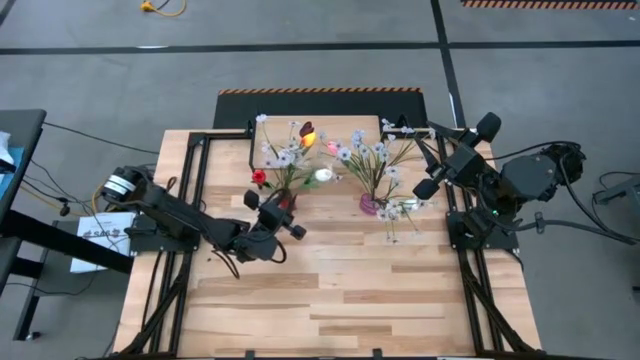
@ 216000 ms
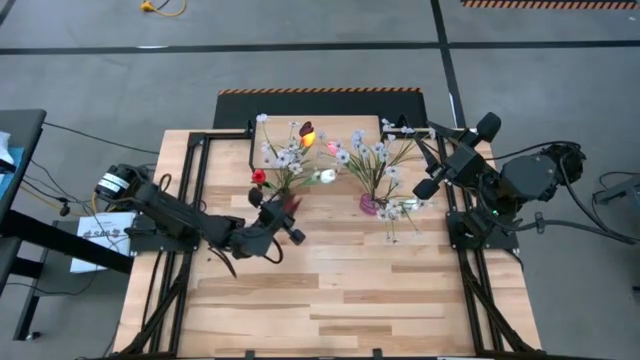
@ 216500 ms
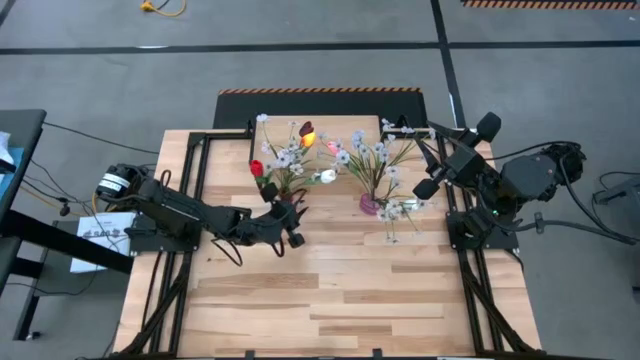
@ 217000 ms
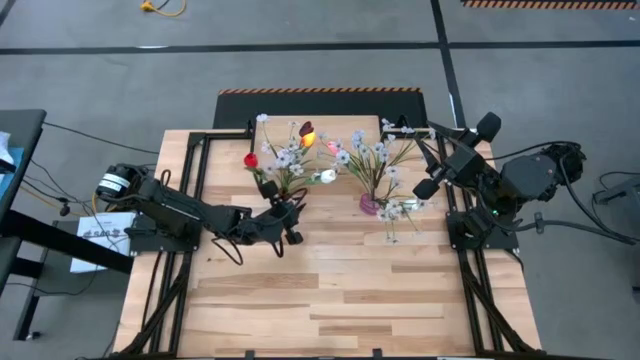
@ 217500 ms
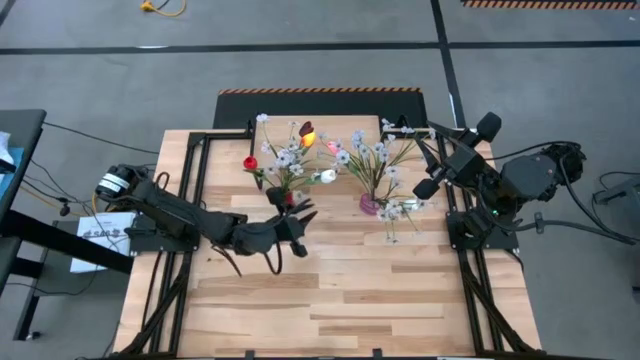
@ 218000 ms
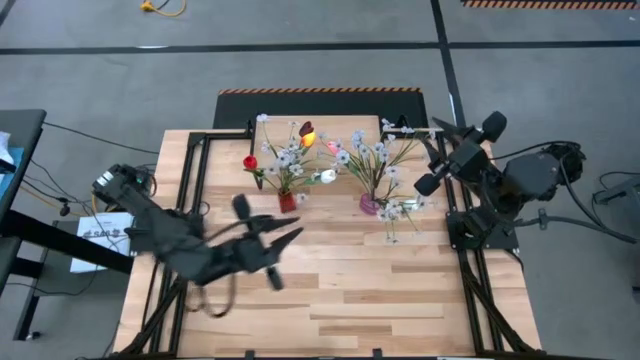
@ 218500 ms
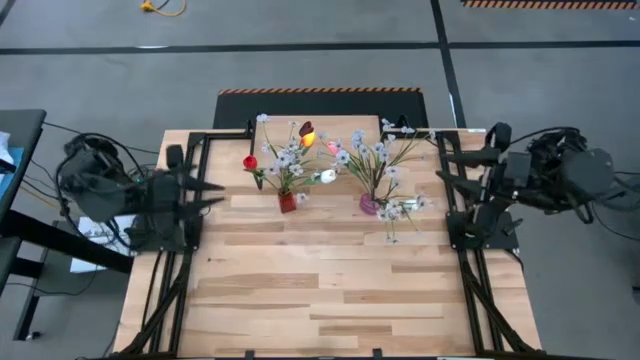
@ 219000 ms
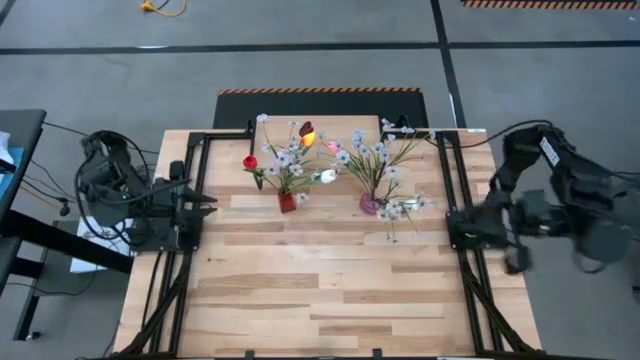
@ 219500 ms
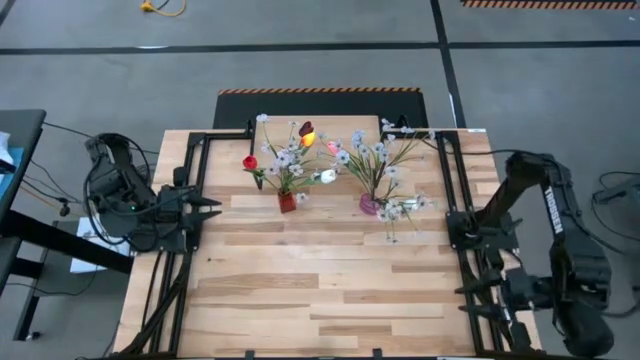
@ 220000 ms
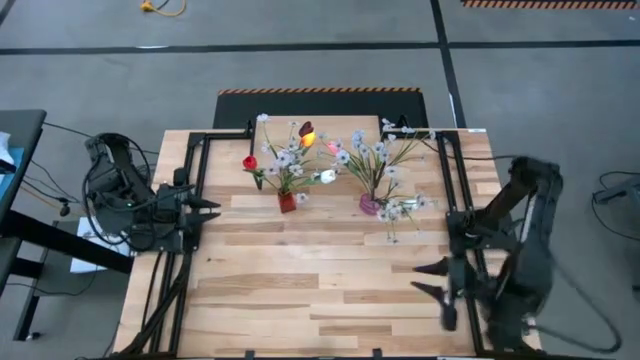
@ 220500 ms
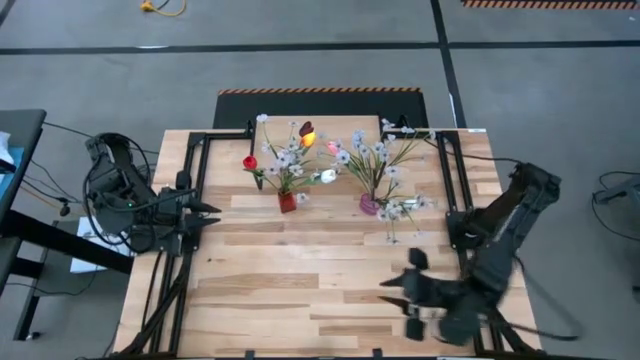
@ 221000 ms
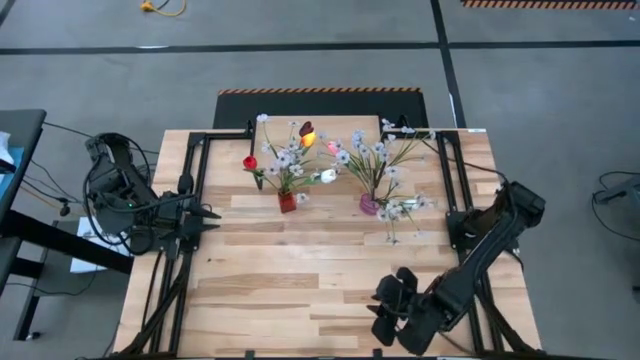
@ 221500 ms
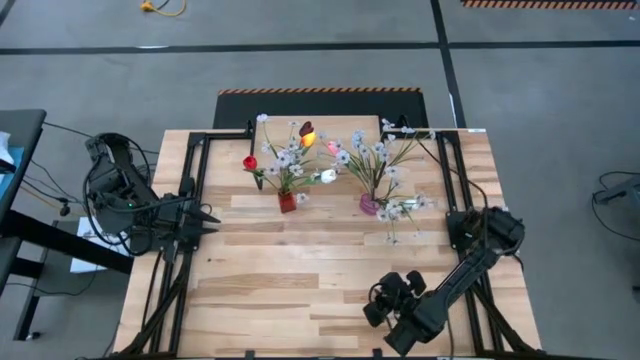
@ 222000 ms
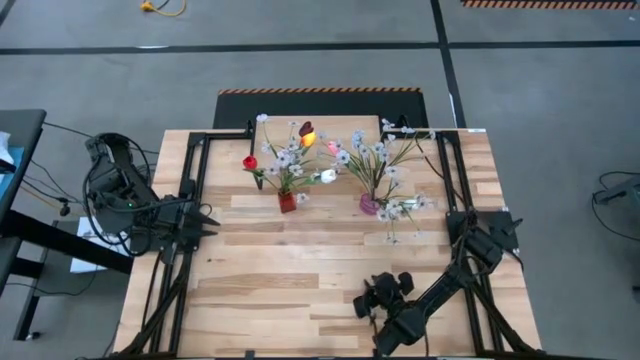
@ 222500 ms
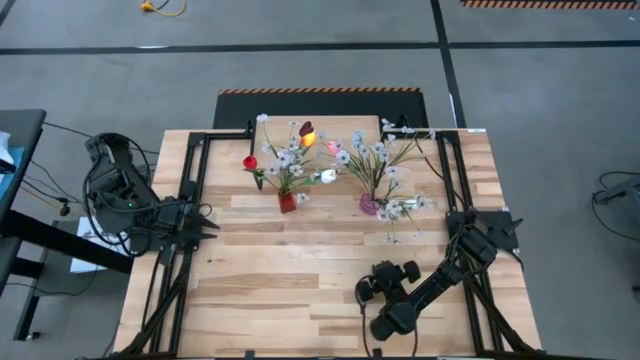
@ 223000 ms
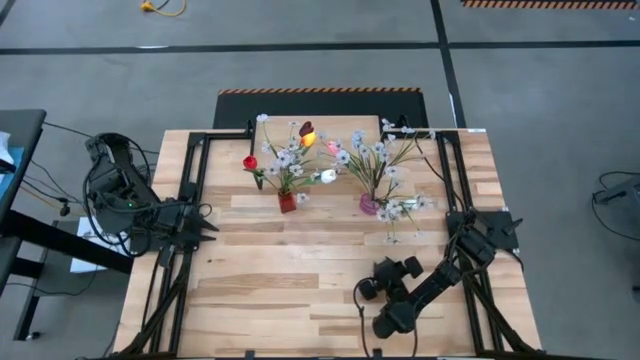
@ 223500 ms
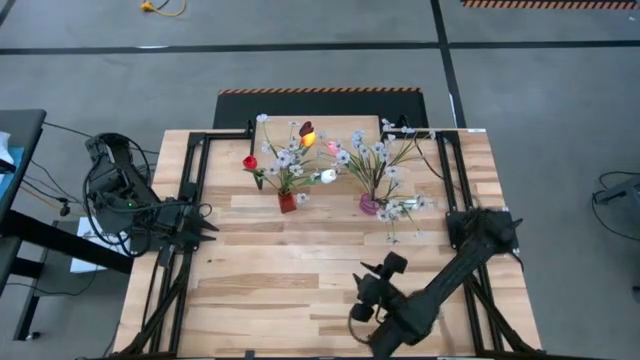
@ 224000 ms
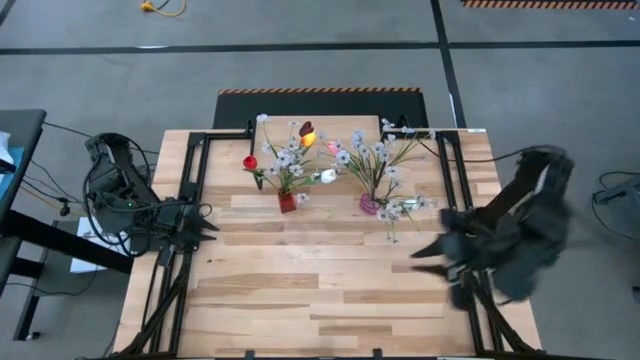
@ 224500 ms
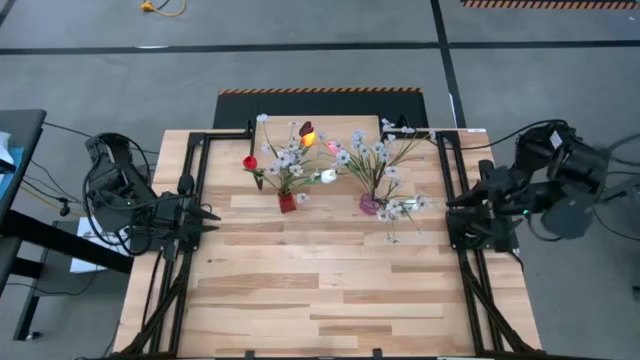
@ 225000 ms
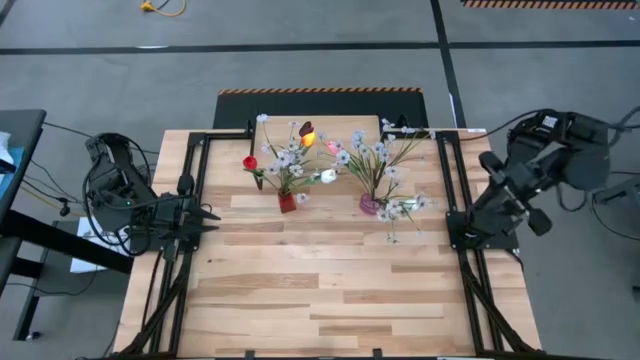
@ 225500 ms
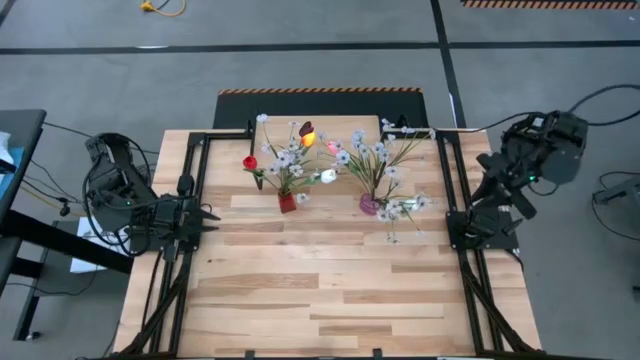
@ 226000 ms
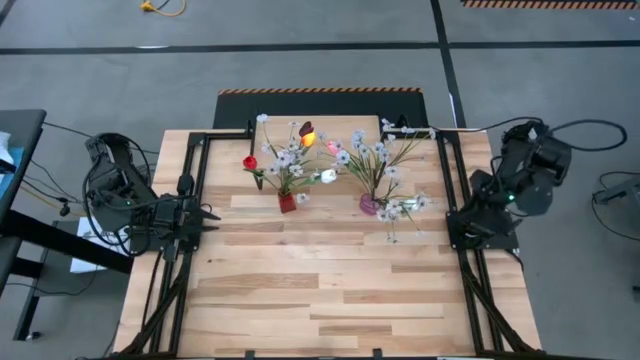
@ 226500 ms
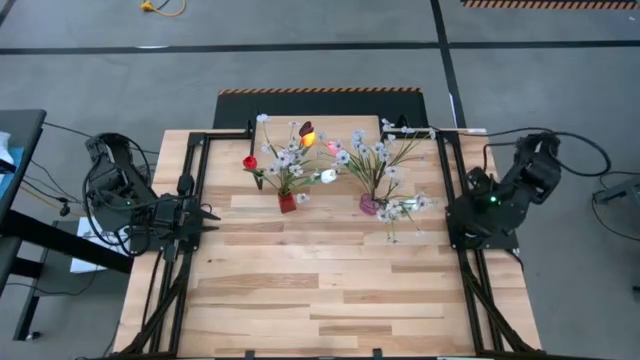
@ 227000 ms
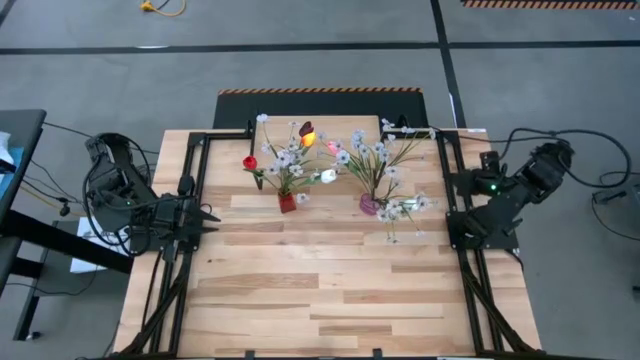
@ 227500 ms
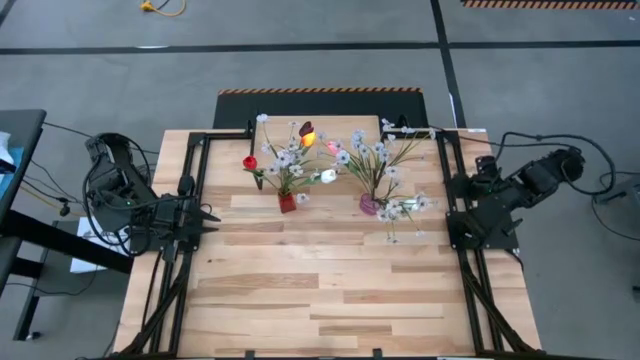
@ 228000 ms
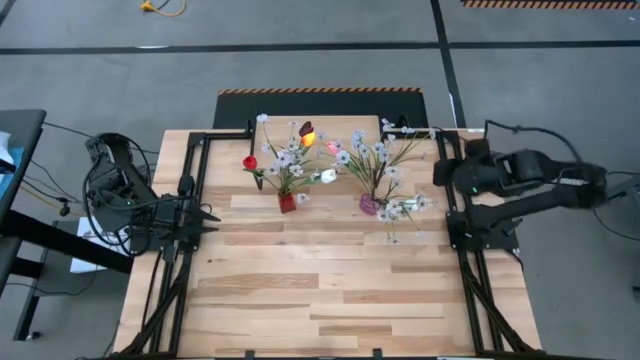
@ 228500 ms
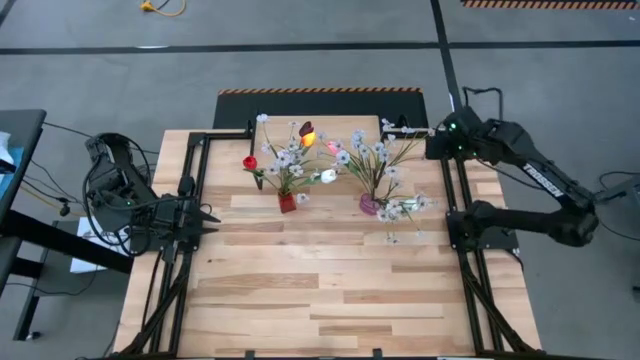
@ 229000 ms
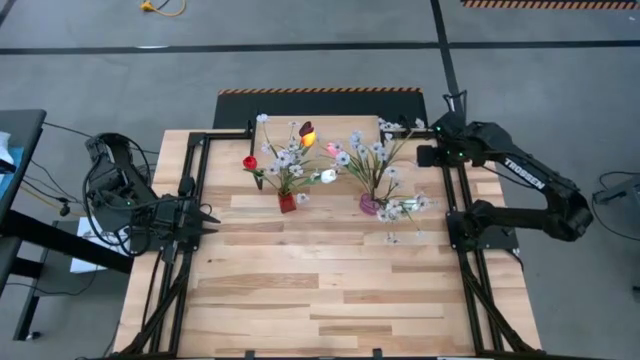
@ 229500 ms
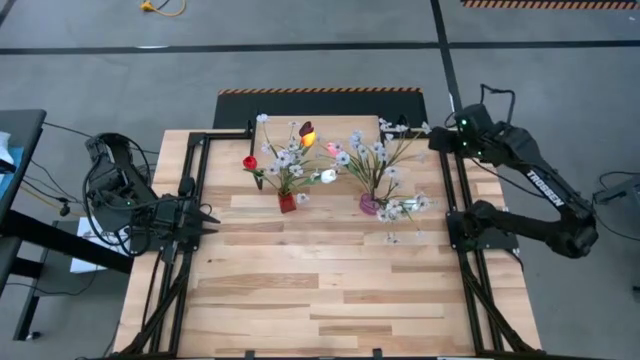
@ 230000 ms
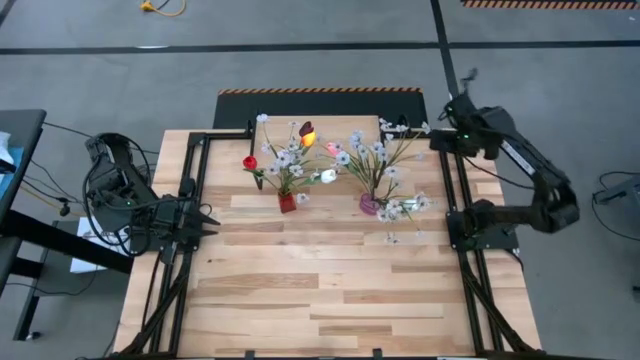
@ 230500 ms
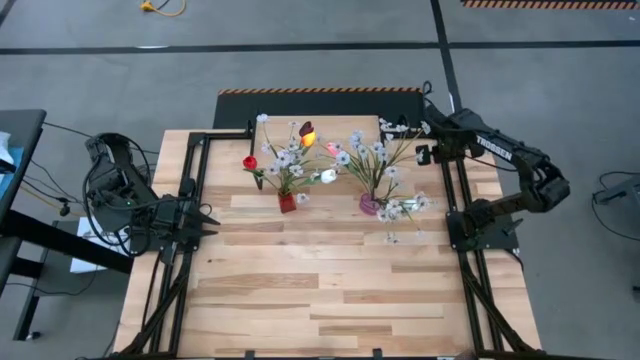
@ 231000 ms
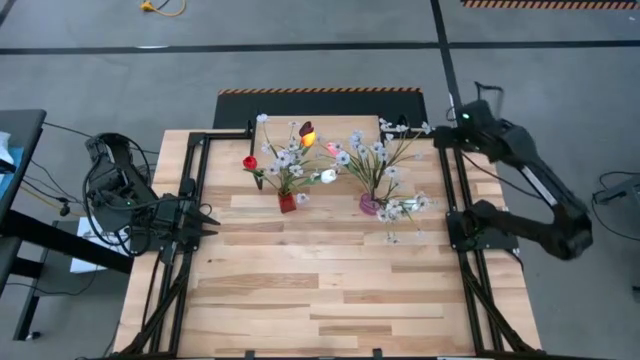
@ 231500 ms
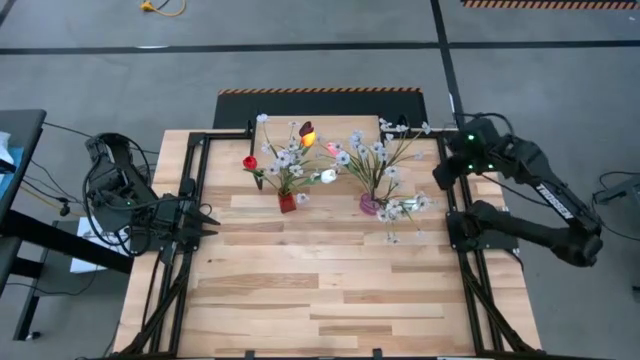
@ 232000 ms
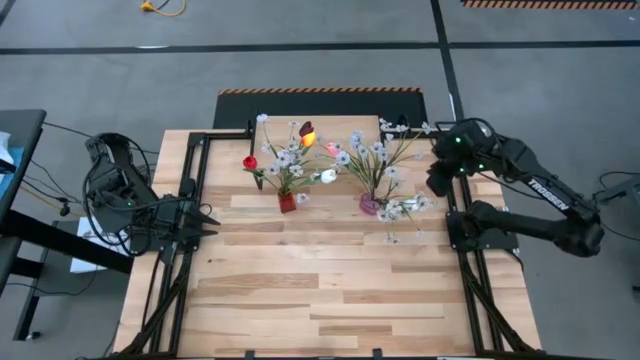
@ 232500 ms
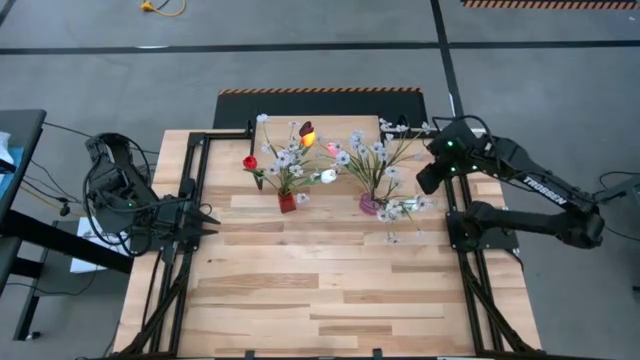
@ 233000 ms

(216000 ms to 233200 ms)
Task: Pick and place flowers into a vace then onto a shelf
Put the pink vase on the shelf

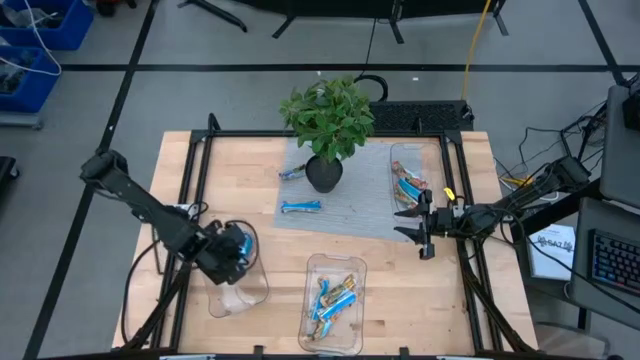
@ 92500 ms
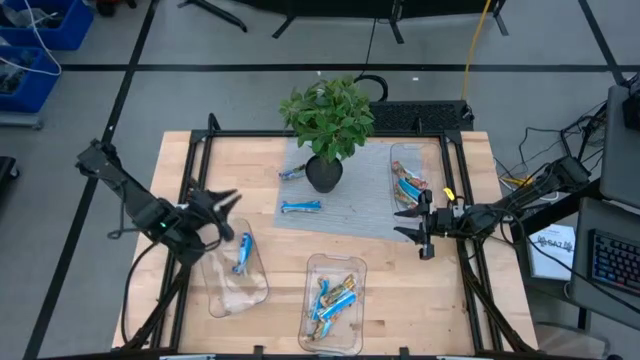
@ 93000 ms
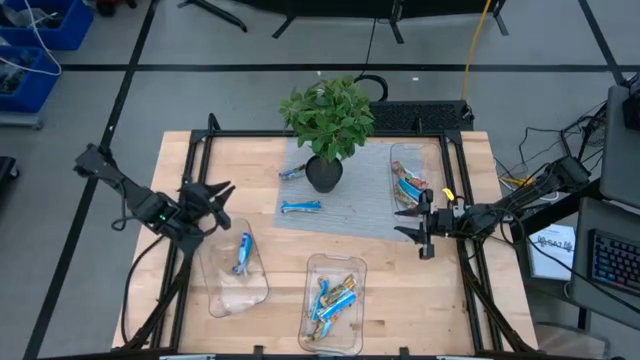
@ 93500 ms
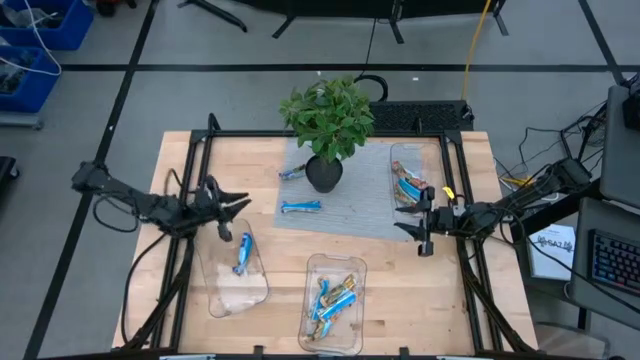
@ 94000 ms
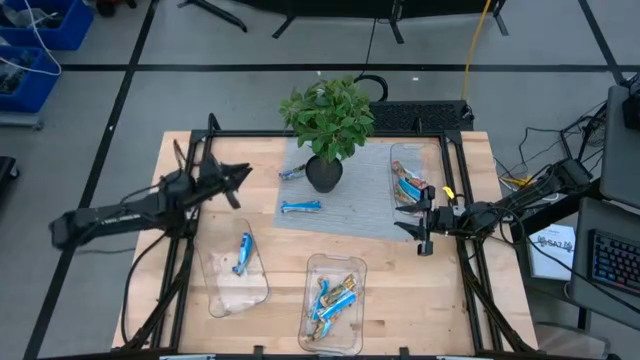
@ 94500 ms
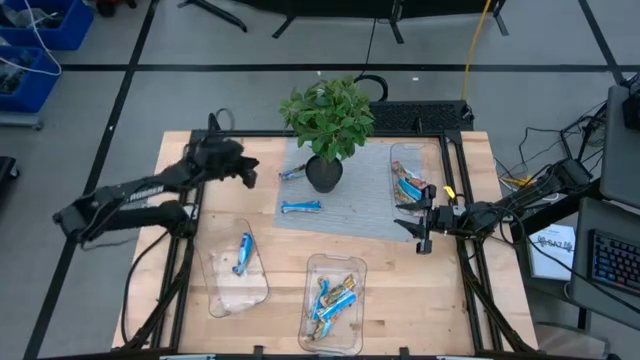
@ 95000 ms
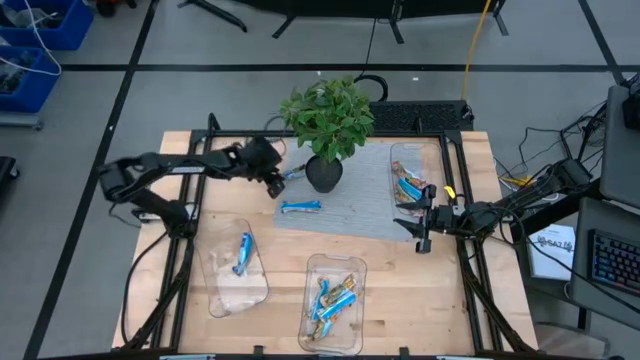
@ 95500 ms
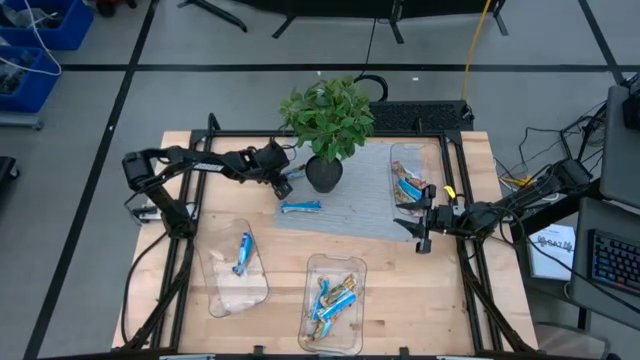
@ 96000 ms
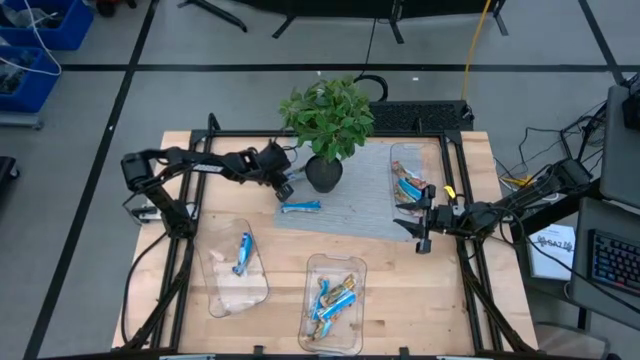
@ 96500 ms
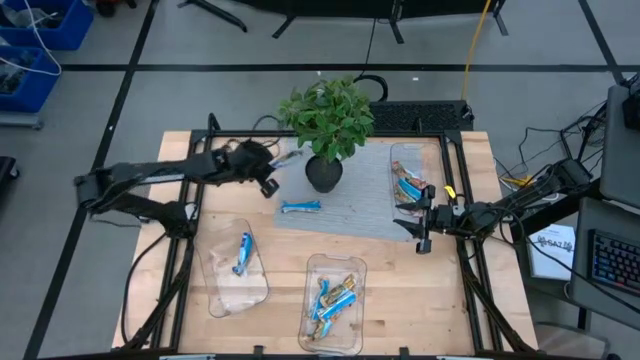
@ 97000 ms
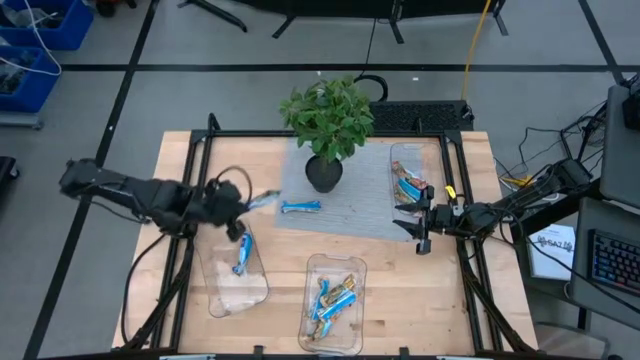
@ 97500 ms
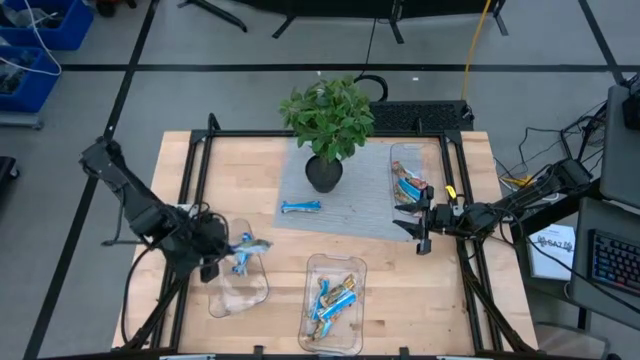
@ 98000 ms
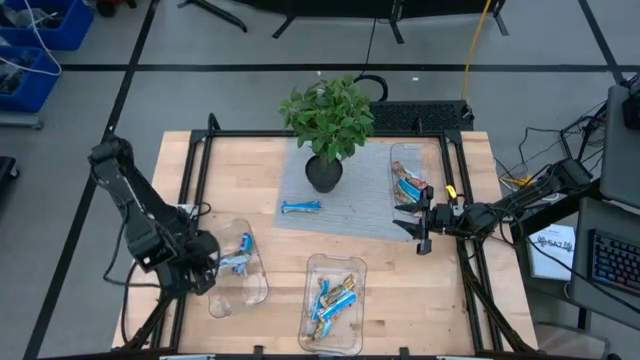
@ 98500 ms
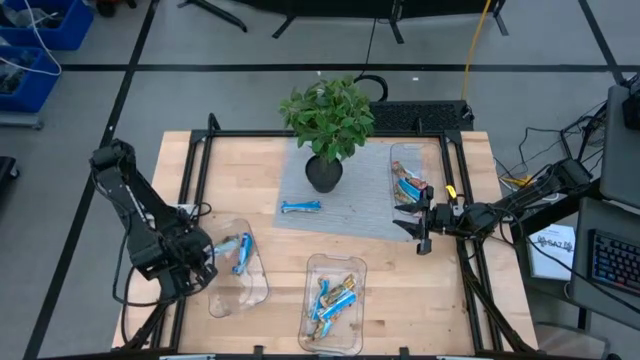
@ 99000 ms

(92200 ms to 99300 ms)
Task: Pick and place Granola Bars by type
Put the top blue granola bar into the left transparent bin
